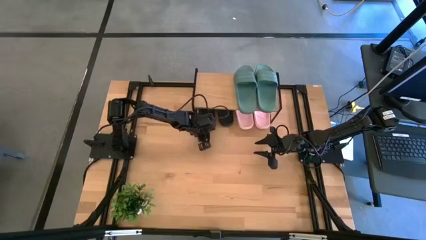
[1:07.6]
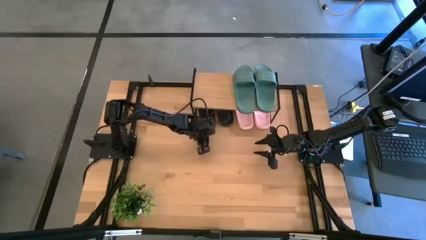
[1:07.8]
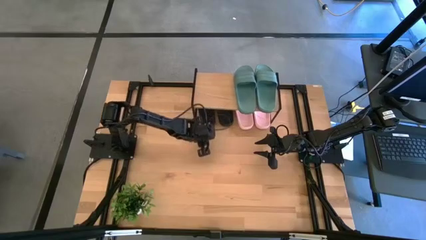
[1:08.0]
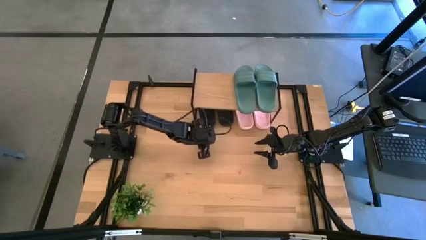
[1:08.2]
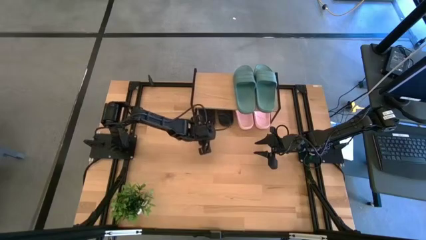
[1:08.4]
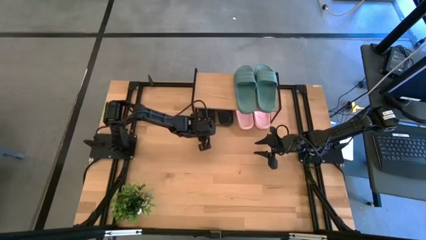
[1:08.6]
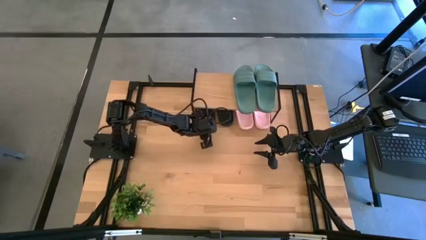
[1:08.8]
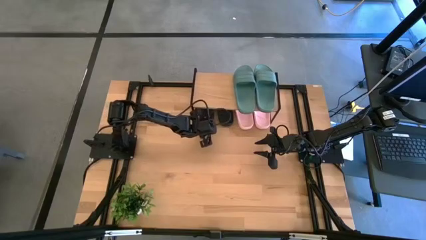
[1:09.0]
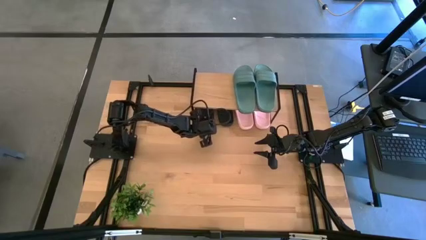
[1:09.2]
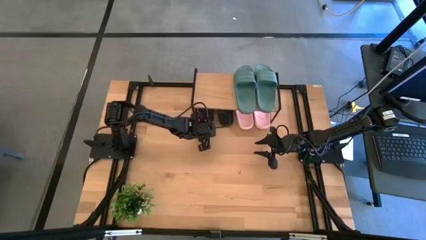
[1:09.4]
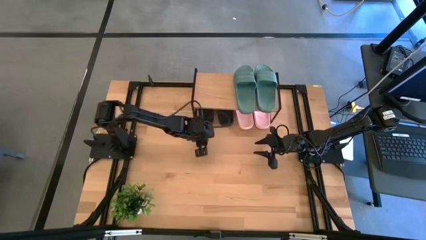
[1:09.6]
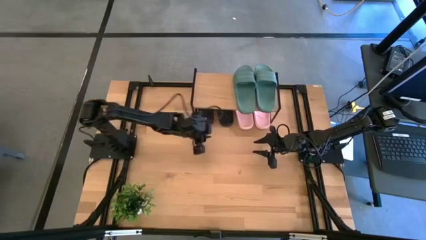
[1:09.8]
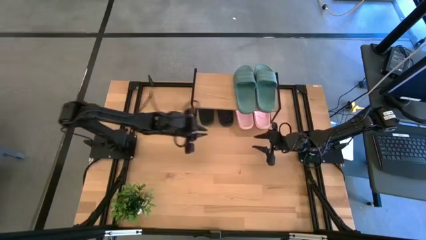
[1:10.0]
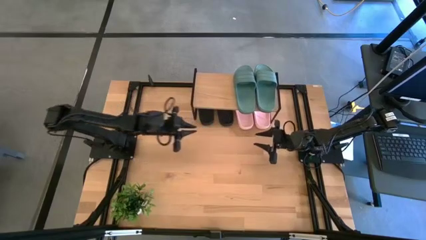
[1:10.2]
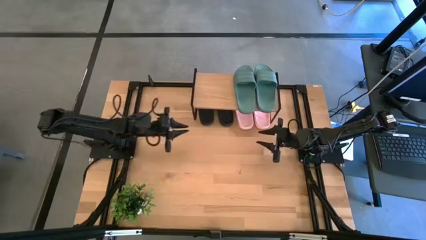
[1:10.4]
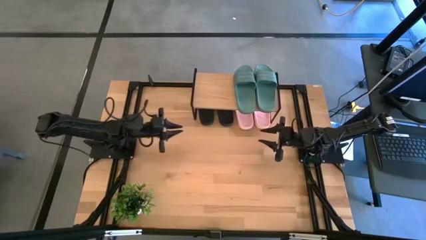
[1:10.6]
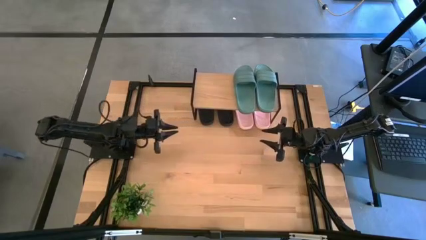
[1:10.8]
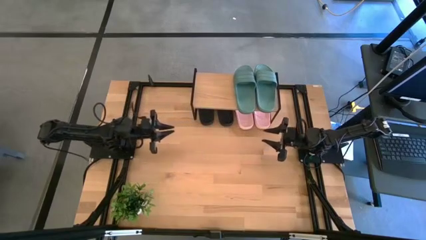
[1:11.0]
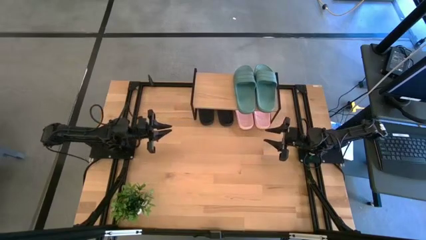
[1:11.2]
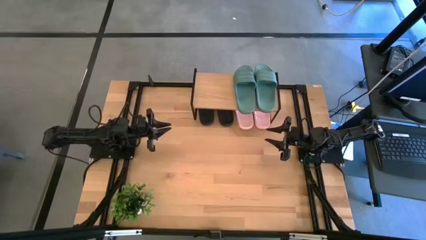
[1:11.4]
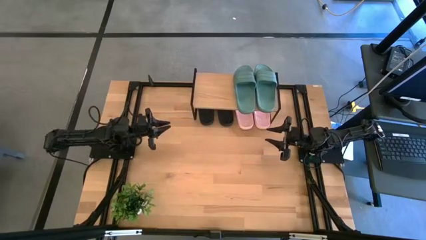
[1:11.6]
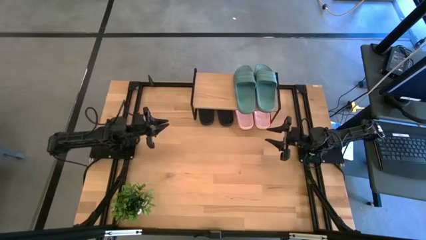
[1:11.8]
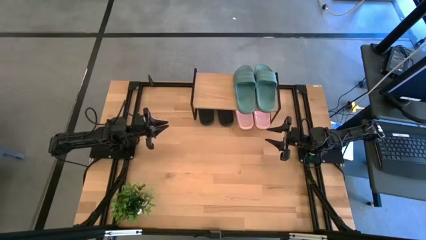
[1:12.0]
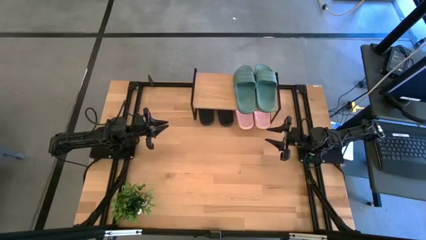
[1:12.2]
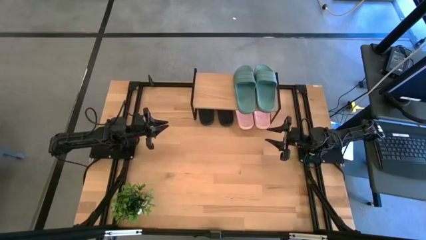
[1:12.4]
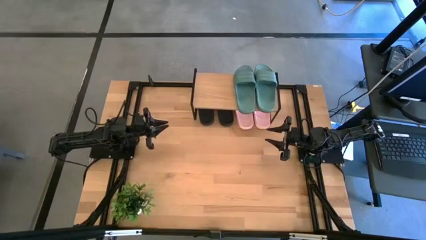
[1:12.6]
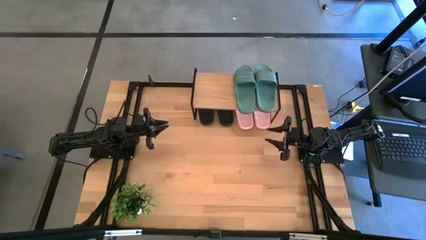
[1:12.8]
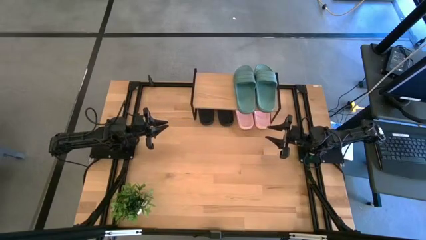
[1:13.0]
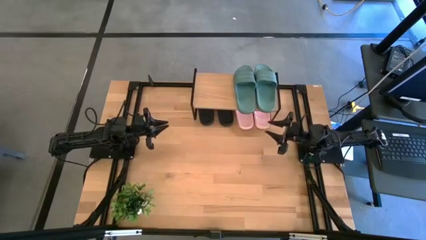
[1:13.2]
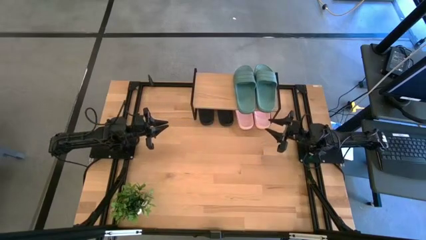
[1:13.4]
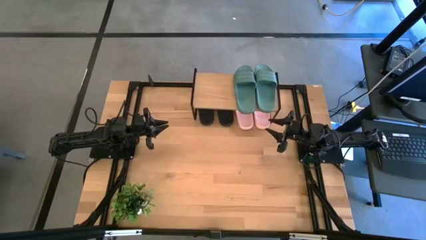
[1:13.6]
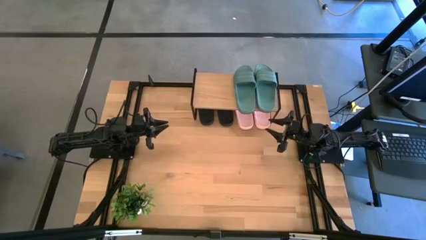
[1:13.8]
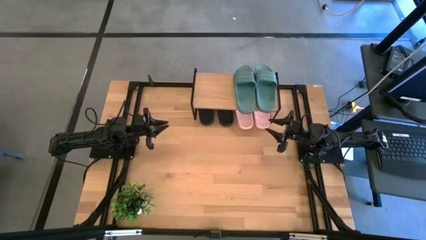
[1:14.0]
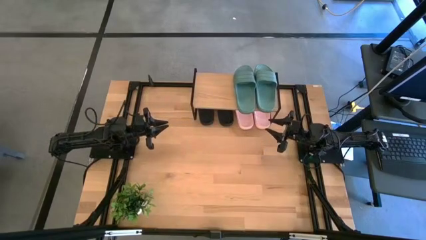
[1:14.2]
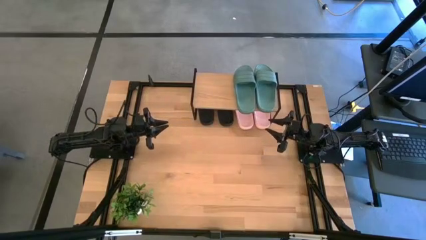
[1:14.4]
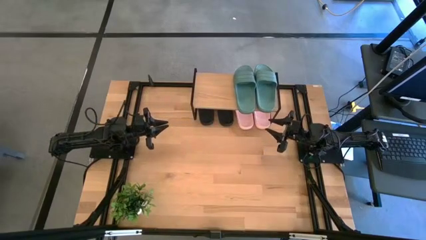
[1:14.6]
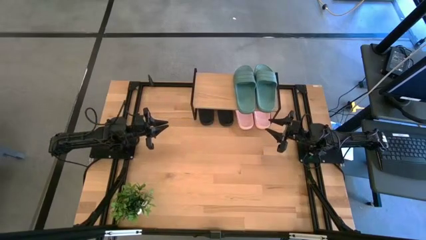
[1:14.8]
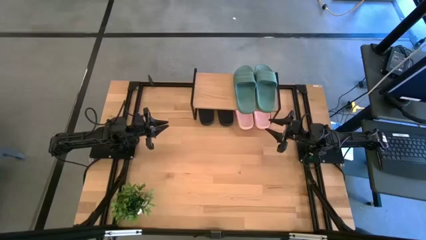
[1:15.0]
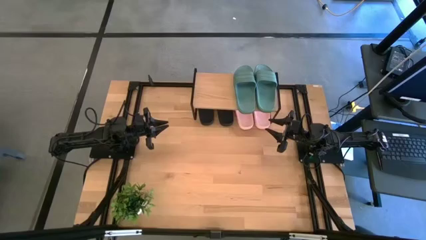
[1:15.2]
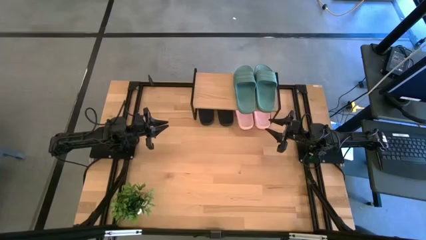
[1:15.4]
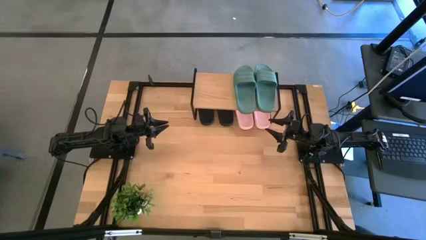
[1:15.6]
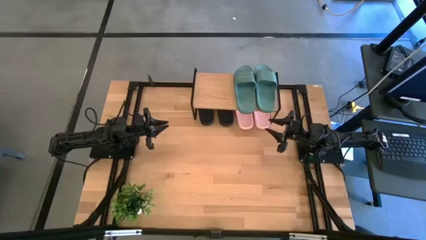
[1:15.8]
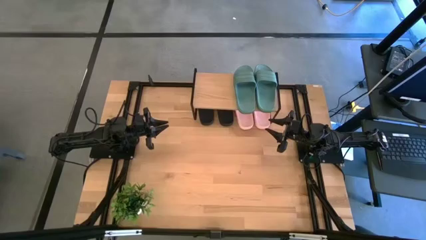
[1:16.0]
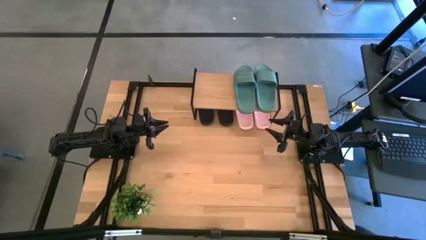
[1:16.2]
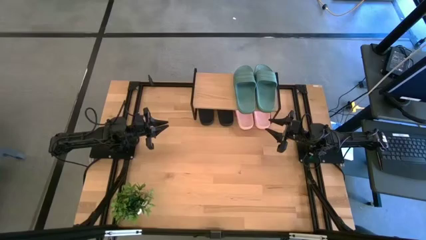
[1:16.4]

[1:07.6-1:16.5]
Task: Pick and place slides into the shelf
Return to Home Position

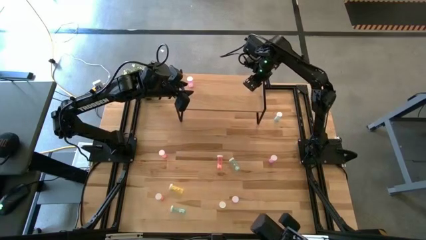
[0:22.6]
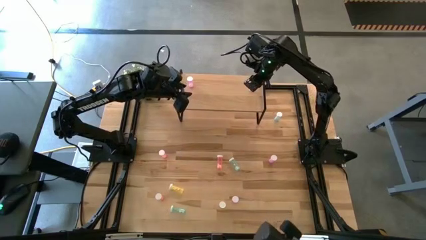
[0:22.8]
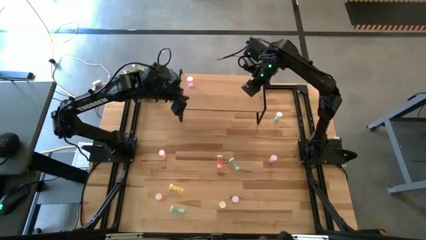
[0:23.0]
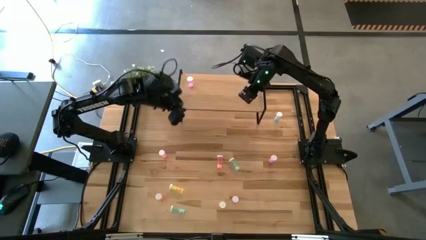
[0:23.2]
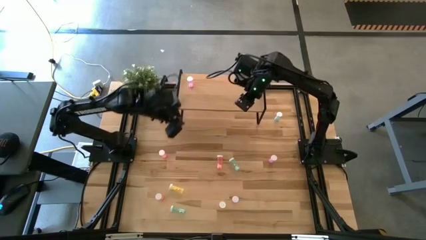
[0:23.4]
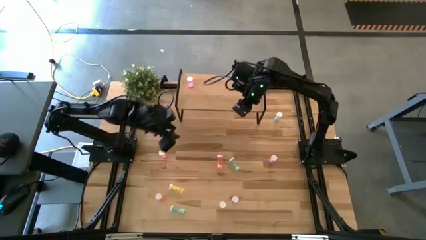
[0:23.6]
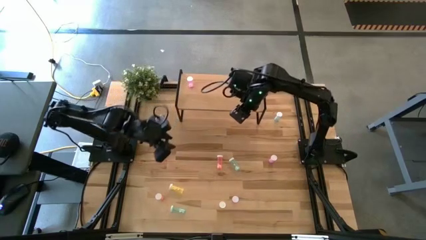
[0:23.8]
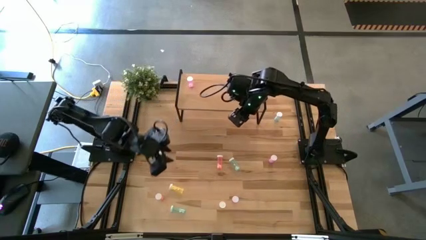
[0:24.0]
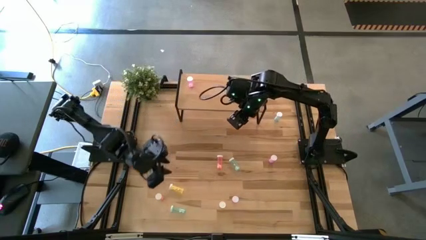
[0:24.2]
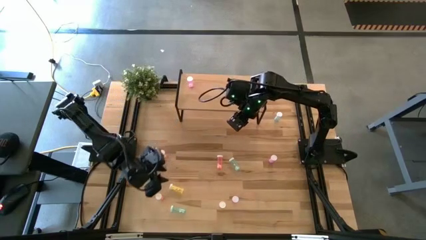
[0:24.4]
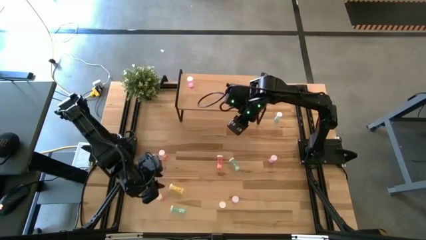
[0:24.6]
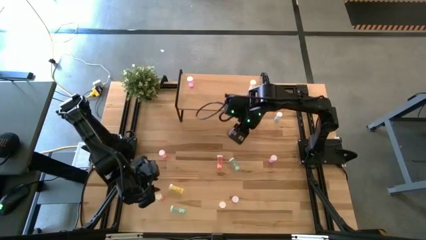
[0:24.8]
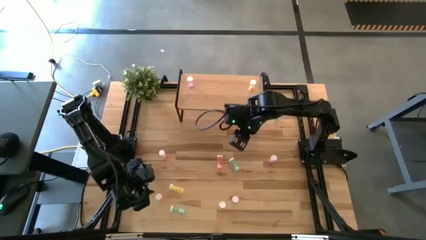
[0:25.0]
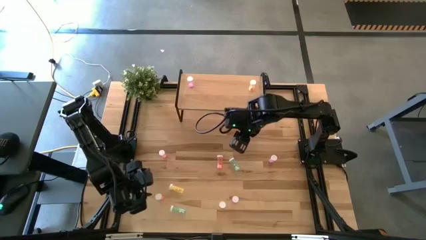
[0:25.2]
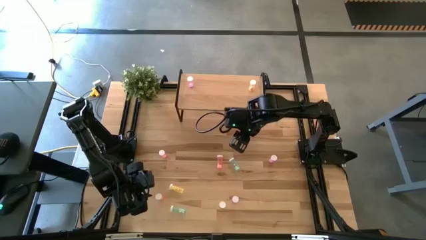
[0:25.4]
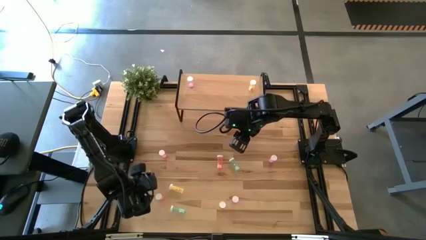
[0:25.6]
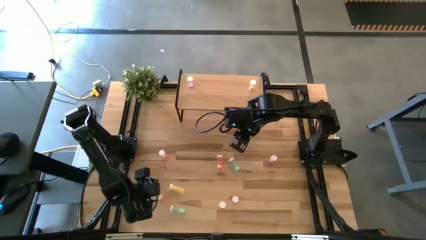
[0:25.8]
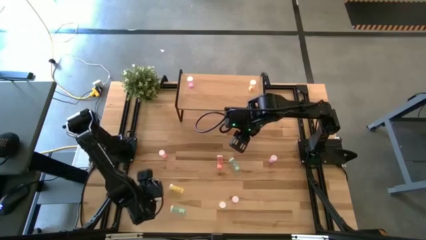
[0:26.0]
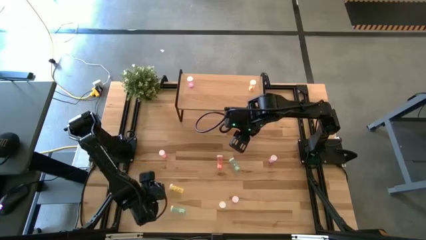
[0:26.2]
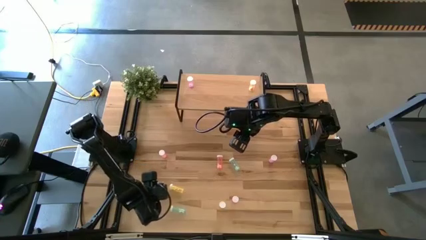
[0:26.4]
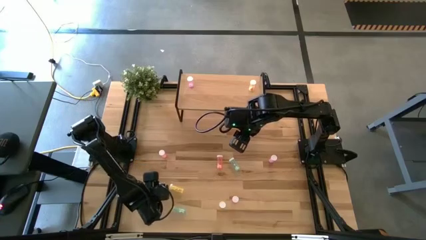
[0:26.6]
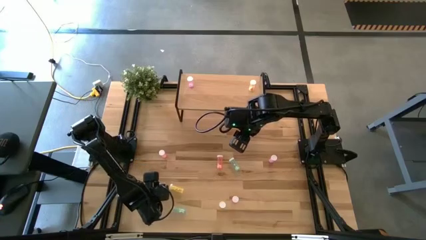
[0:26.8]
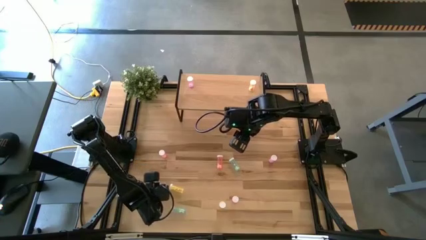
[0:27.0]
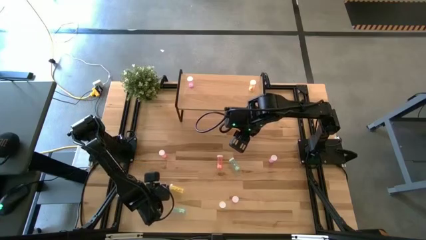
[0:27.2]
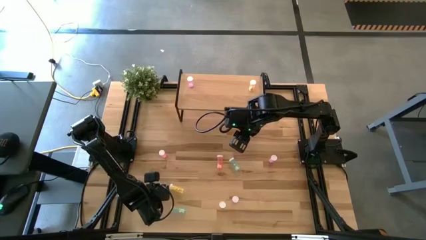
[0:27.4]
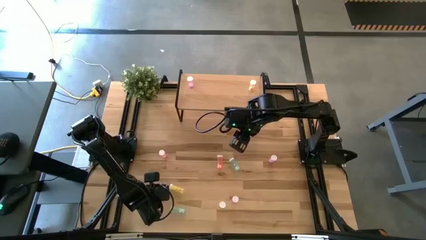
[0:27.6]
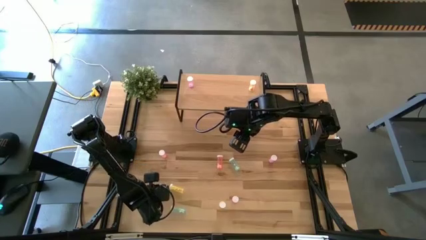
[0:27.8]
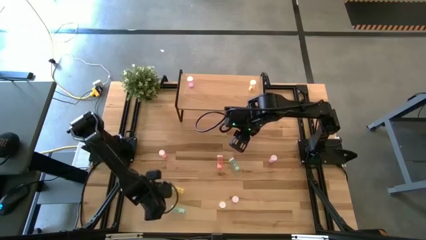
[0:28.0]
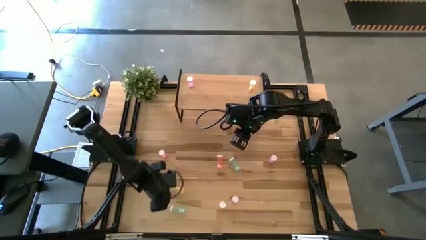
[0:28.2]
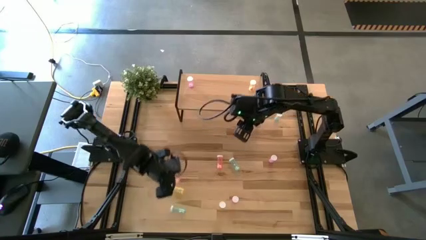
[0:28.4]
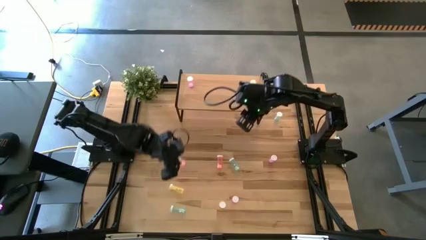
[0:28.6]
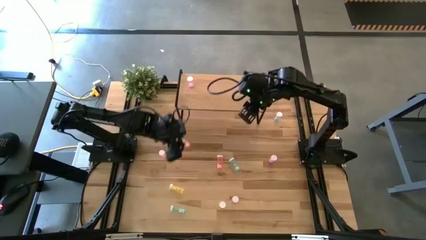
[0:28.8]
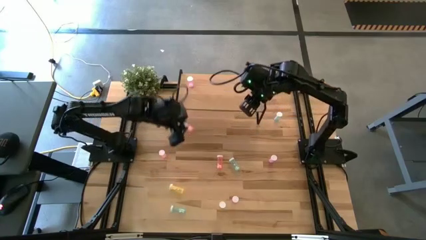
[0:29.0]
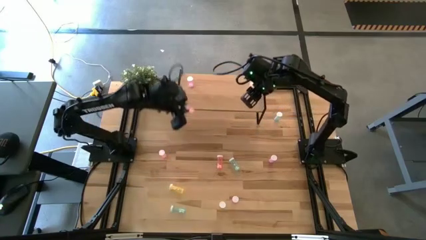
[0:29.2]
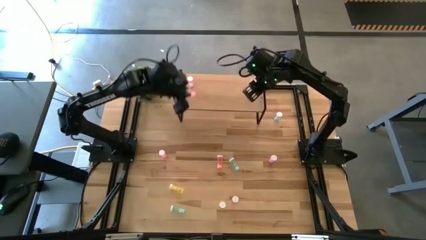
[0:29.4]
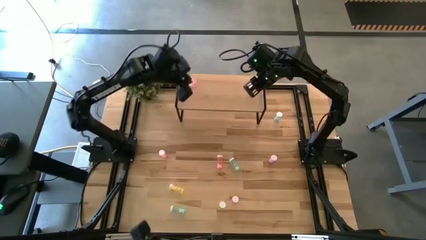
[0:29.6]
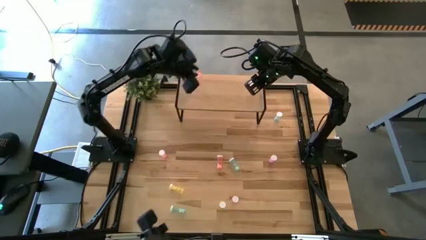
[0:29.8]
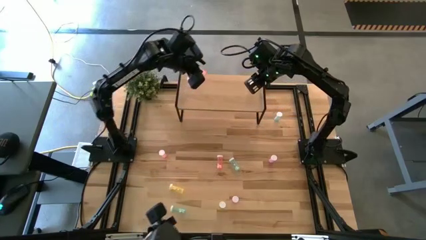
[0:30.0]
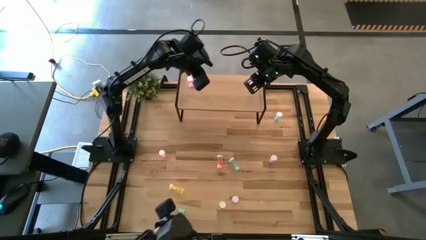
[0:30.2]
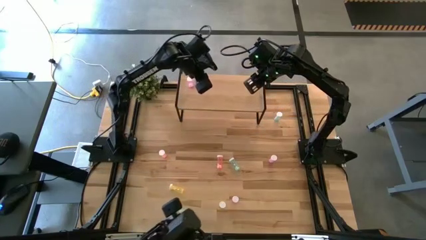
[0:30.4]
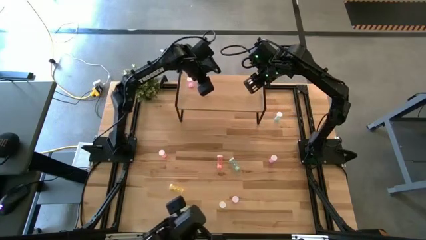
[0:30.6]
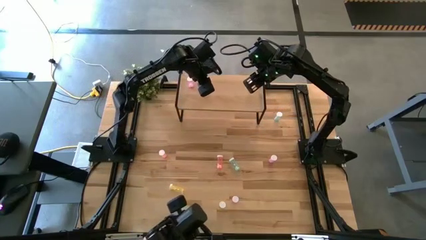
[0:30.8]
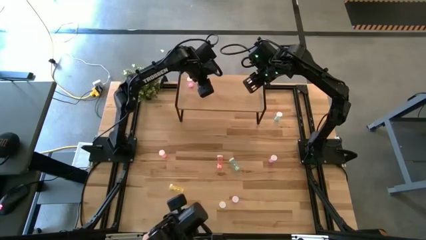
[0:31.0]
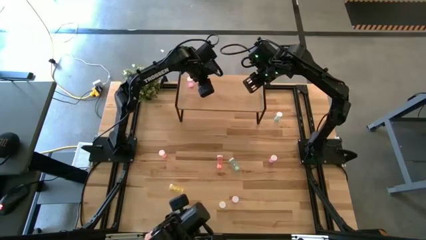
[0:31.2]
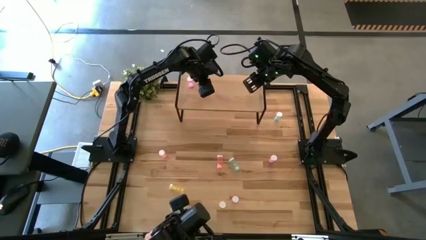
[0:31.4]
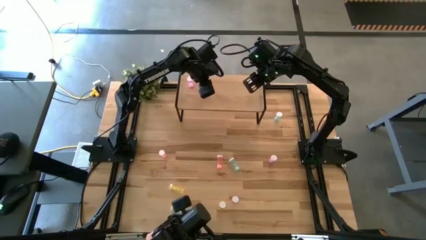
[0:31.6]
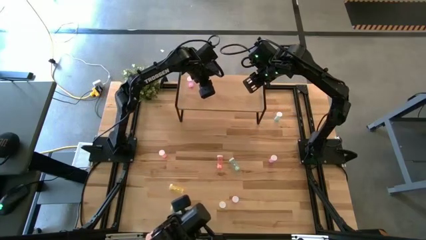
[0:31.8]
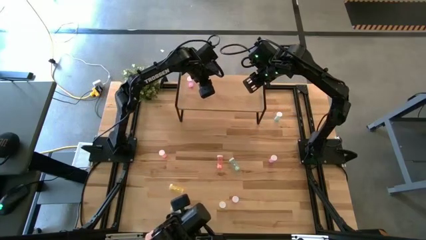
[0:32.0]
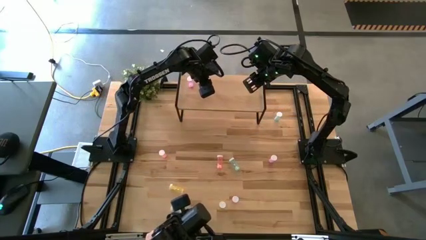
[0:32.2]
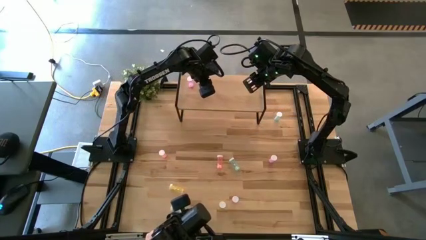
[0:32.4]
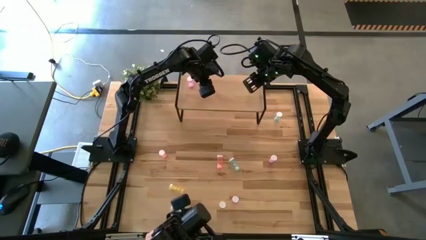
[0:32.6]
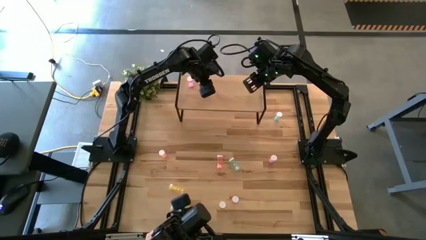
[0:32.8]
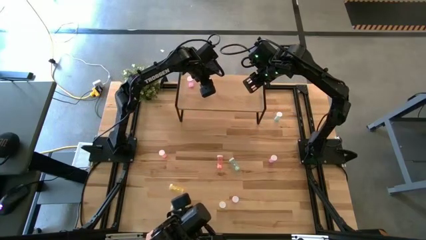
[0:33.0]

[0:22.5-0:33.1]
Task: Pick and place medicine bottles onto shelf by color
Put the bottom orange pill bottle on the shelf
